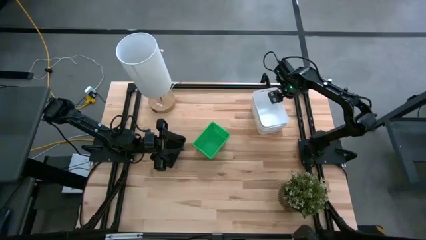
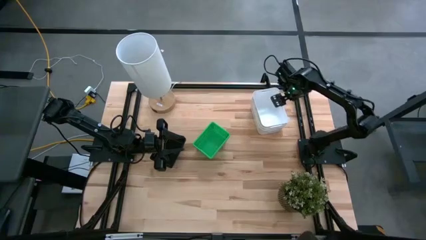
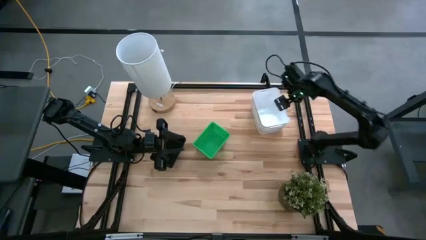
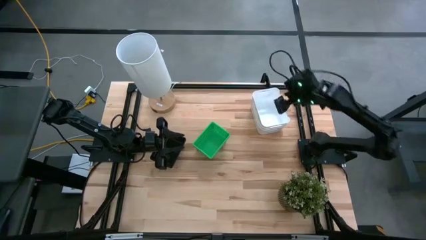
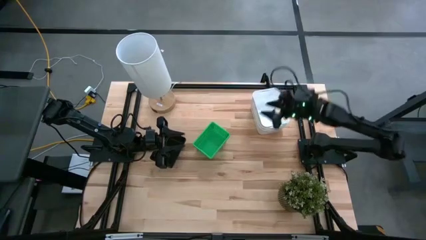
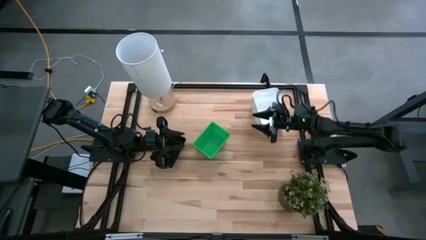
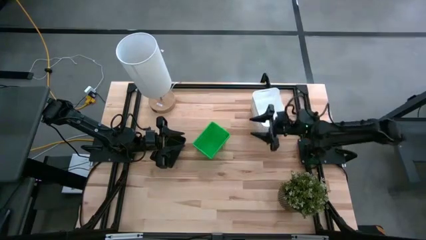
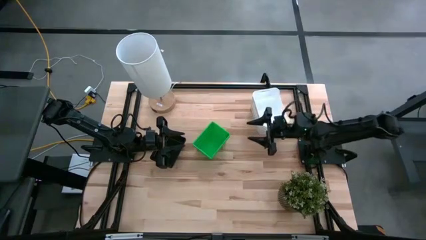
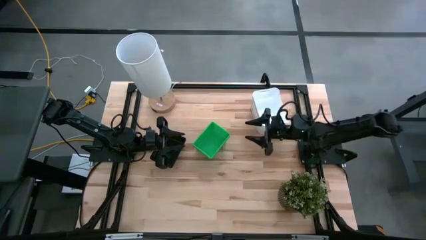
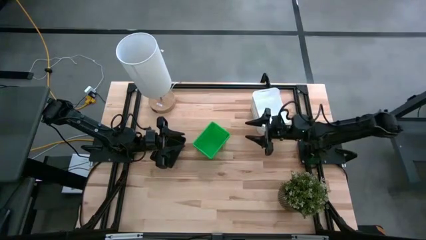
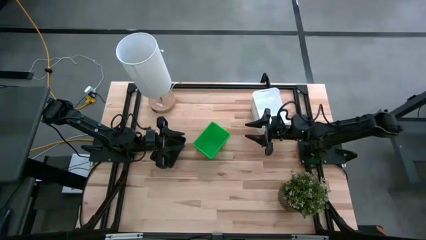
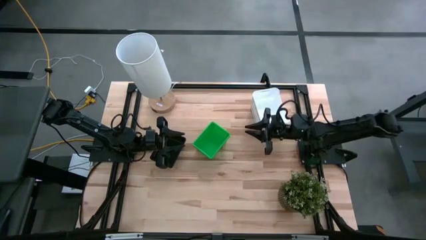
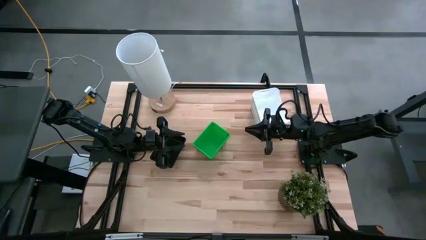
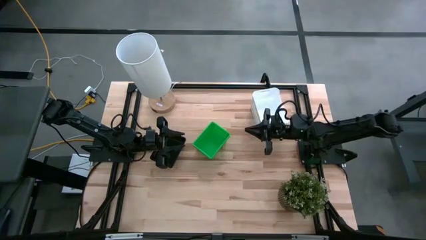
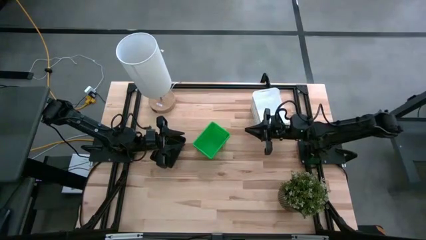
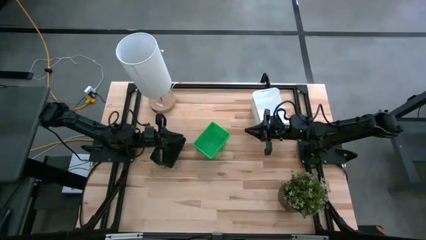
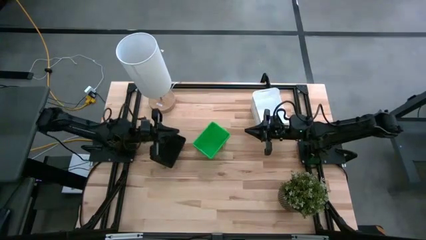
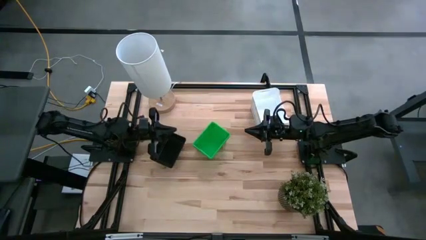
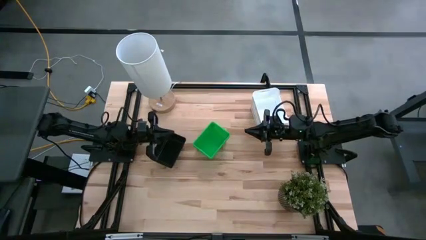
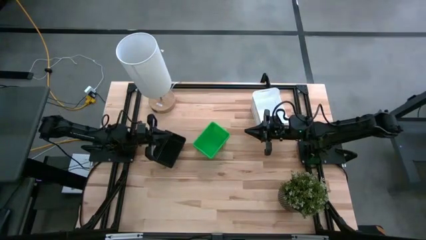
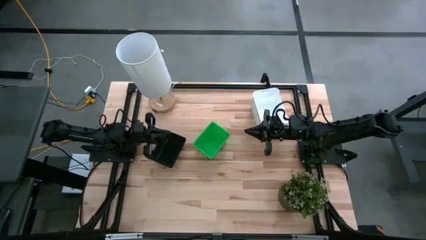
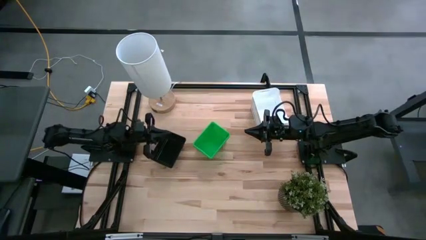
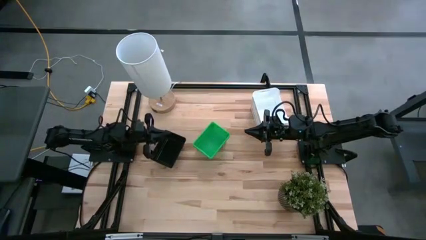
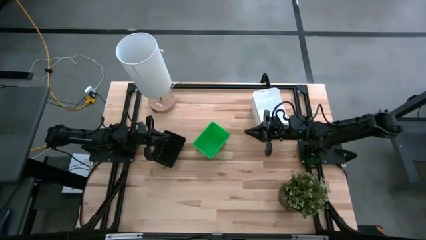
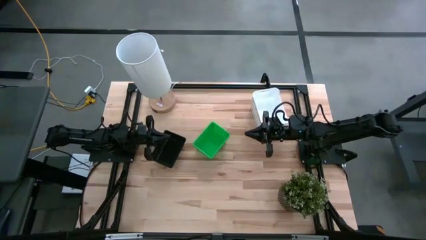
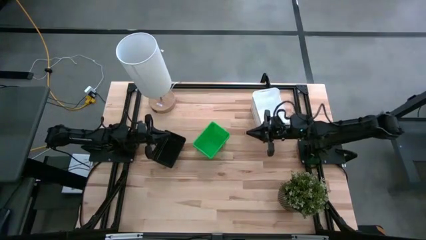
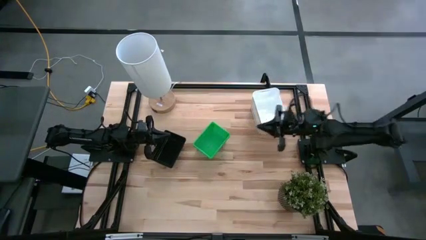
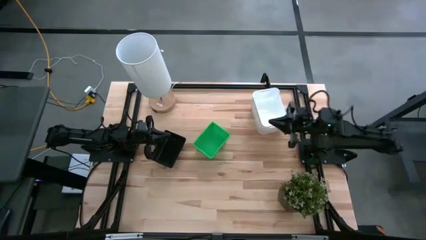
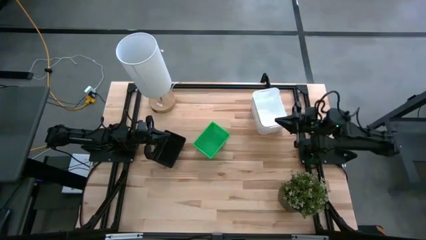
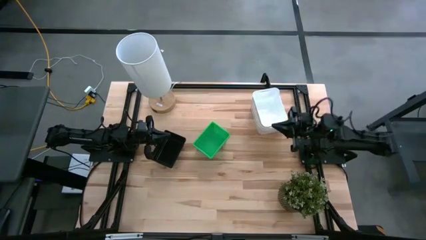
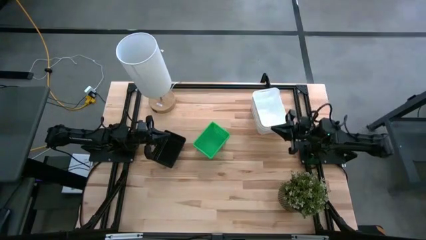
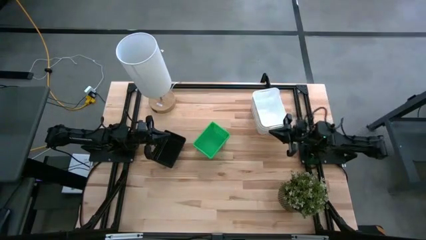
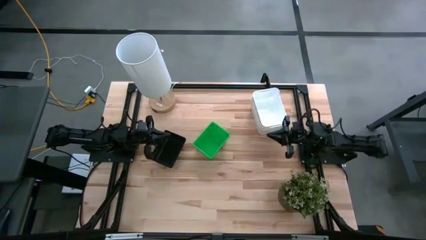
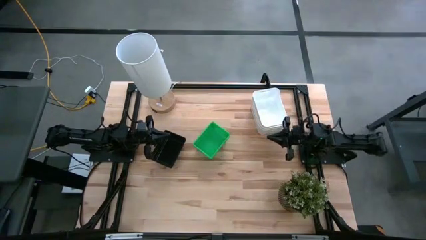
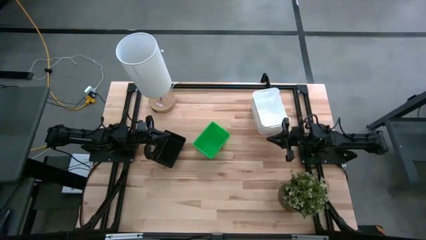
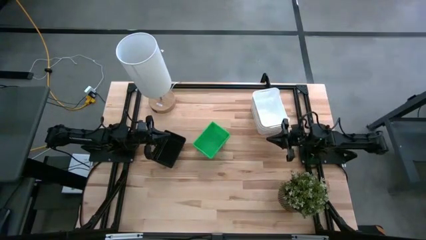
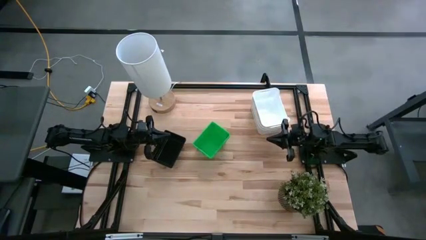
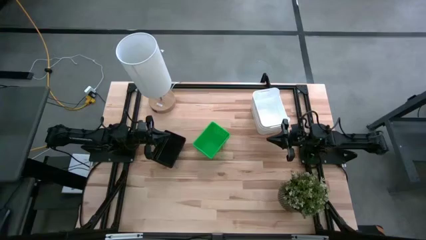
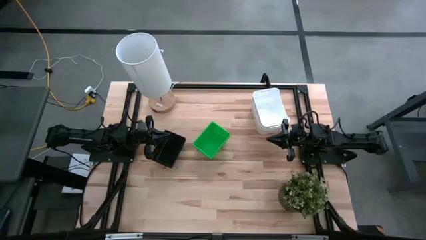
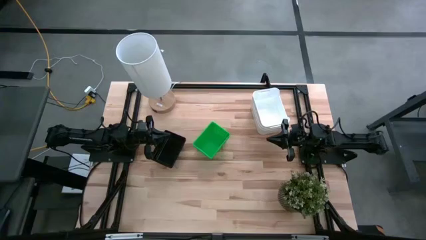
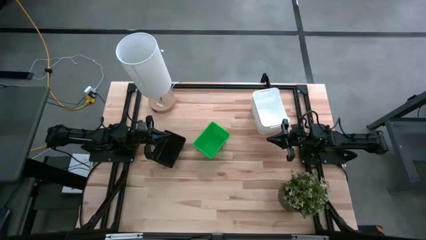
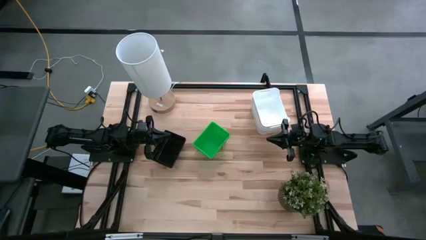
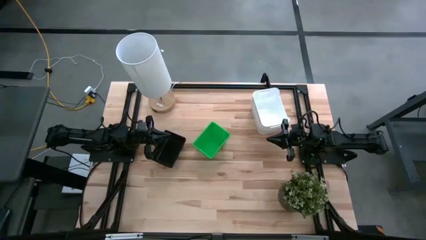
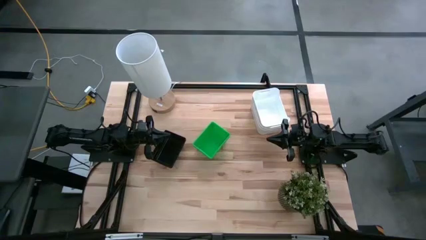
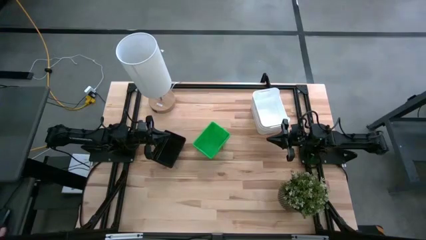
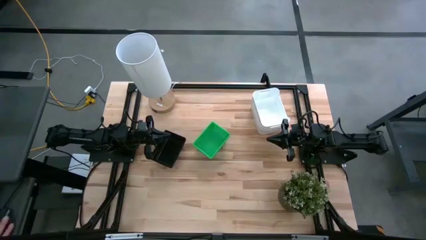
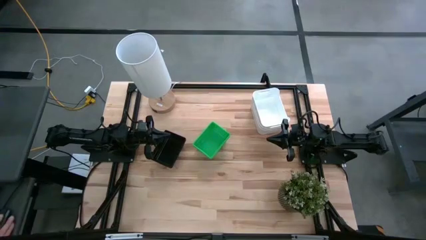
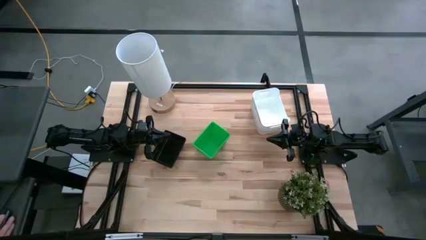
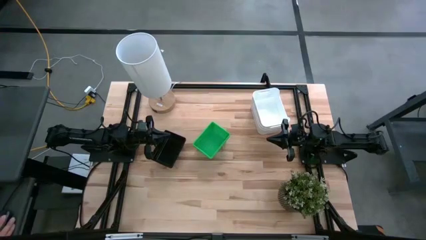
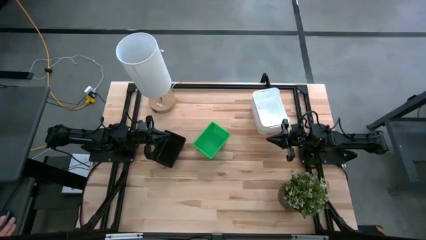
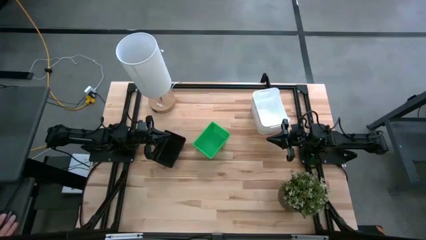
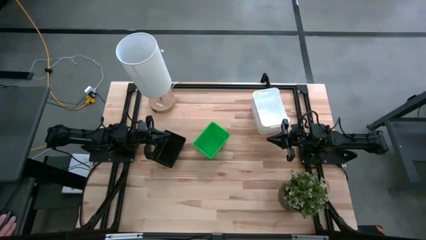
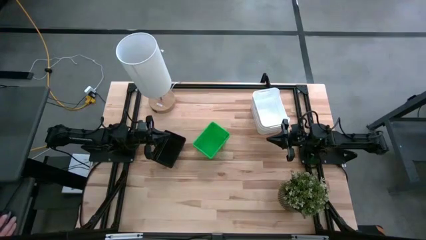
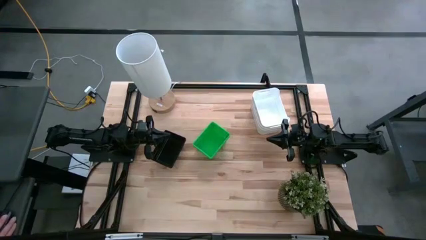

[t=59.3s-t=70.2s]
Return to Home Position

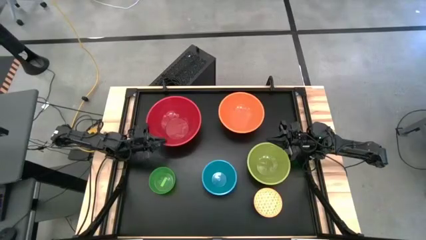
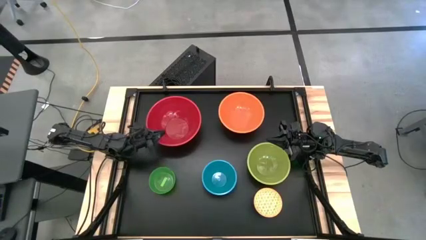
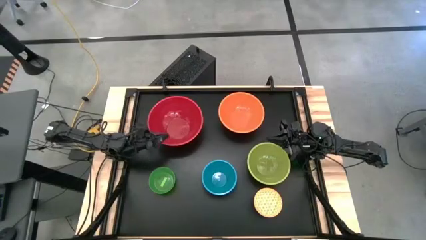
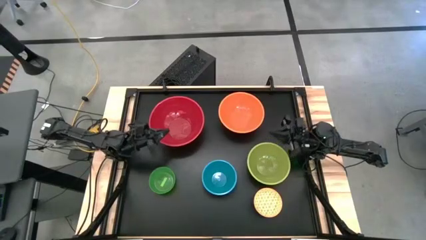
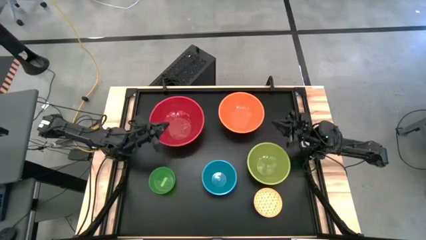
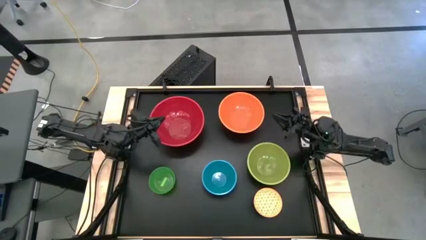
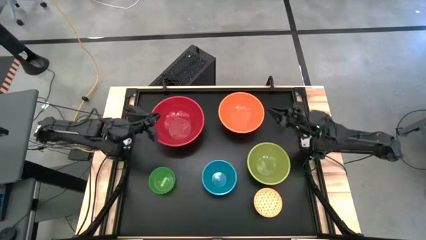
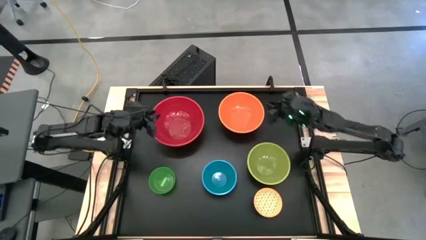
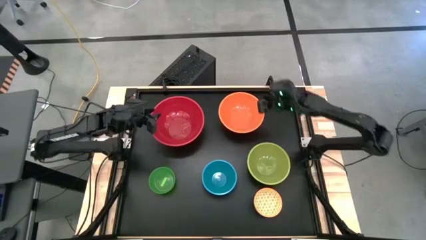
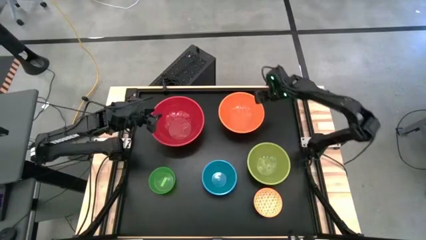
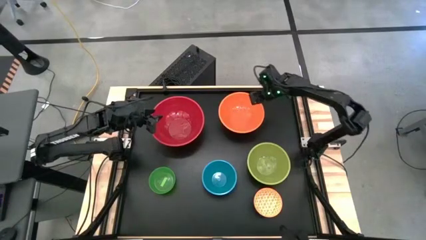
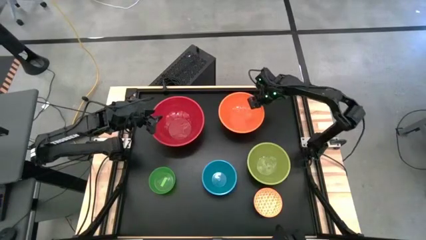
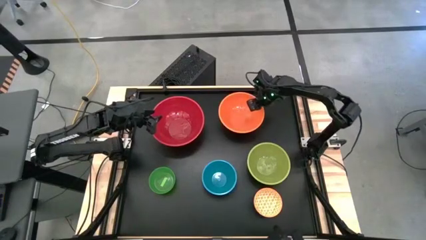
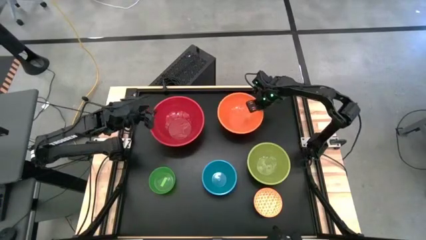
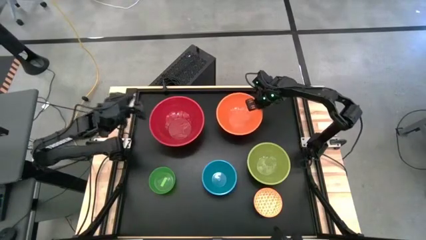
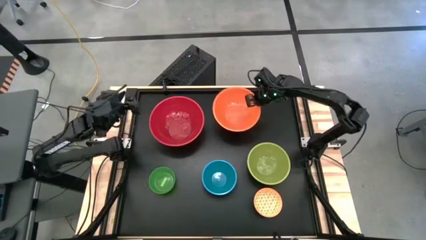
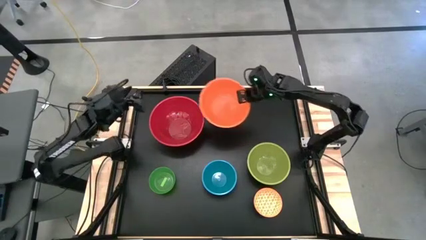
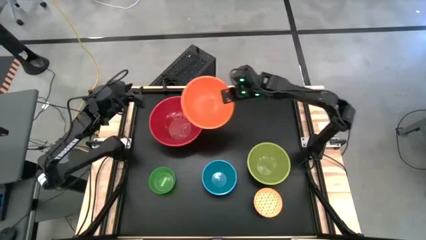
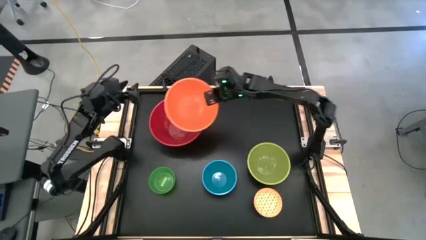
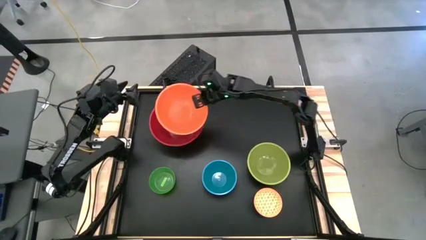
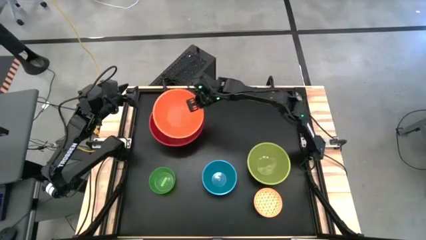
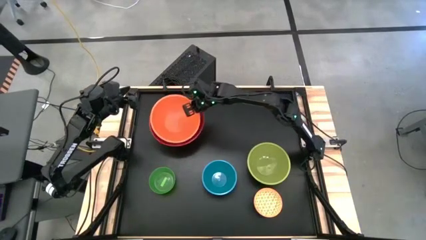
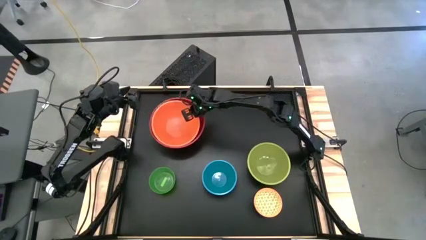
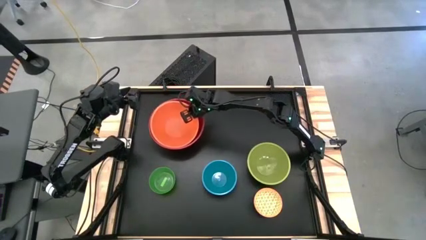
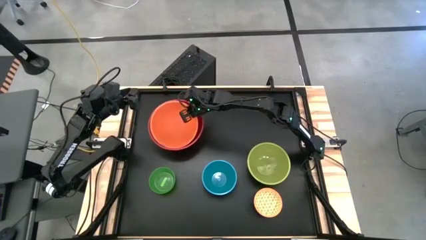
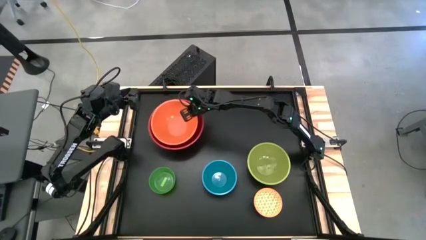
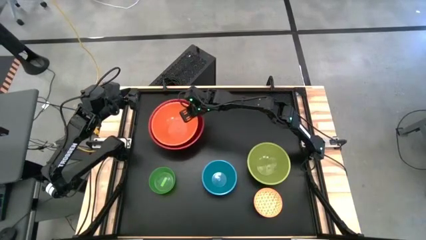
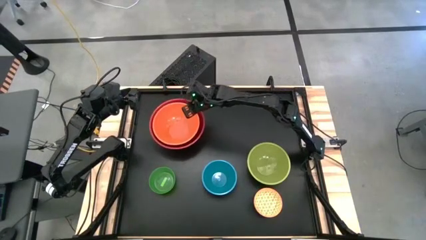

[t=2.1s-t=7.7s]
Stack the orange bowl on top of the red bowl
